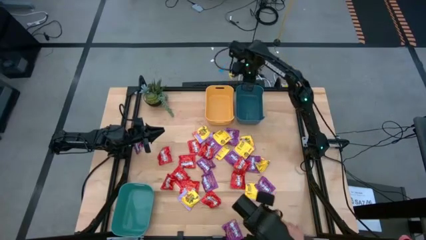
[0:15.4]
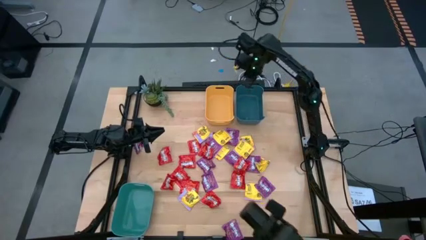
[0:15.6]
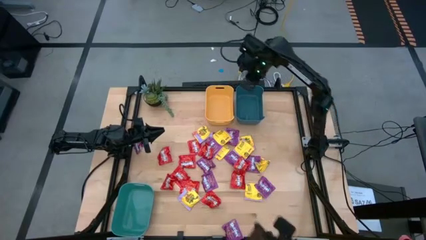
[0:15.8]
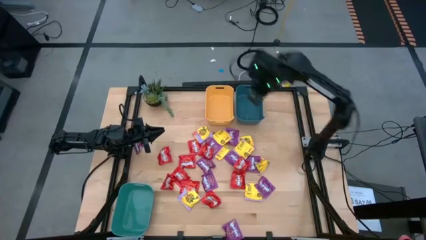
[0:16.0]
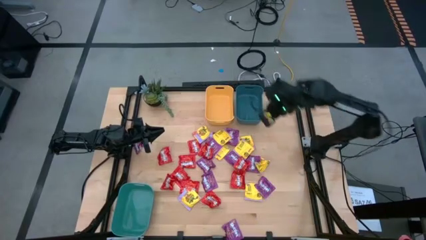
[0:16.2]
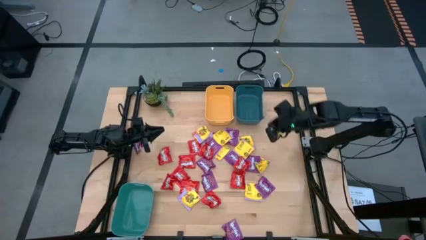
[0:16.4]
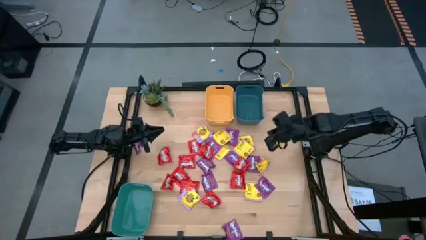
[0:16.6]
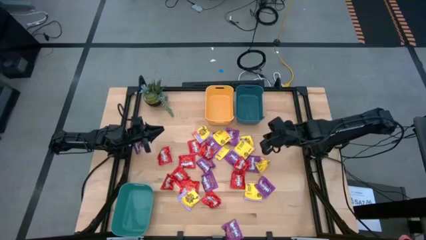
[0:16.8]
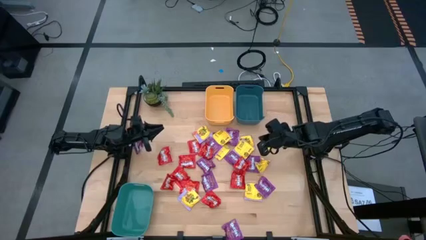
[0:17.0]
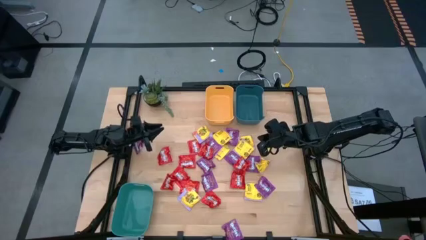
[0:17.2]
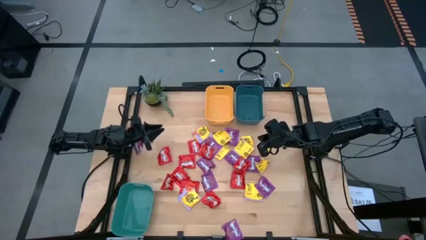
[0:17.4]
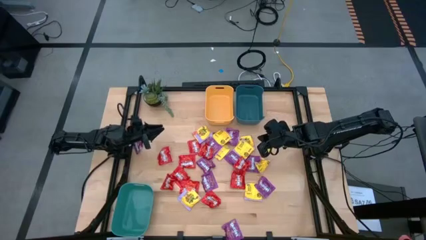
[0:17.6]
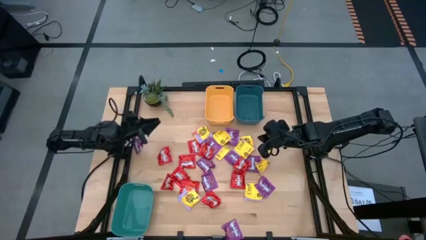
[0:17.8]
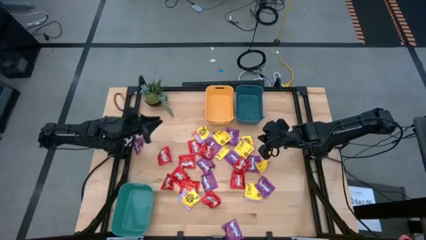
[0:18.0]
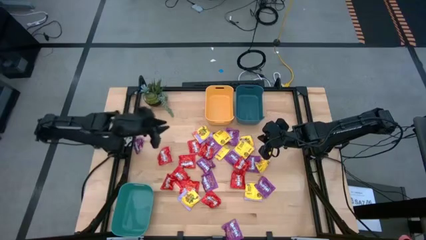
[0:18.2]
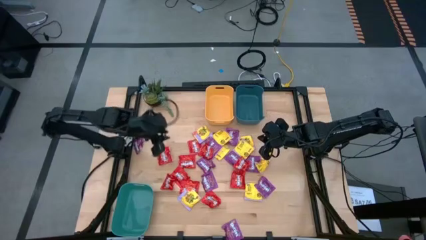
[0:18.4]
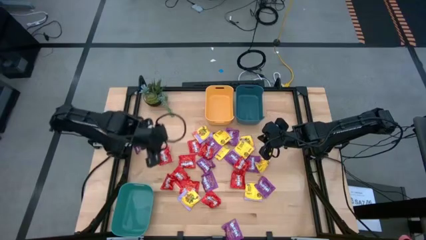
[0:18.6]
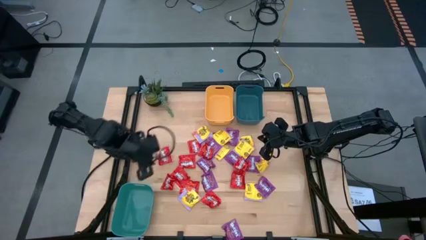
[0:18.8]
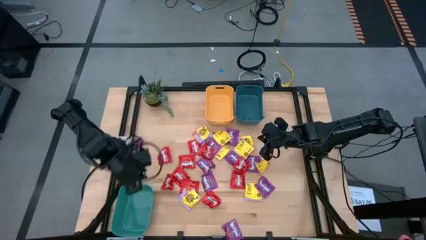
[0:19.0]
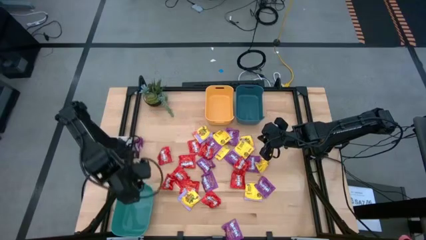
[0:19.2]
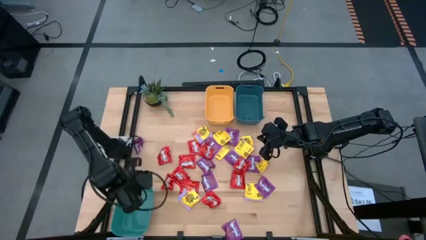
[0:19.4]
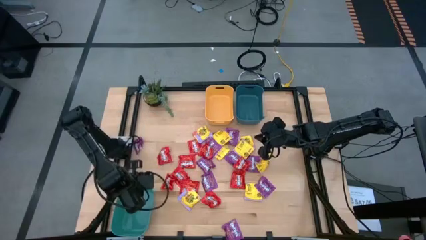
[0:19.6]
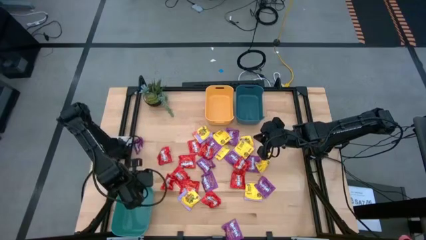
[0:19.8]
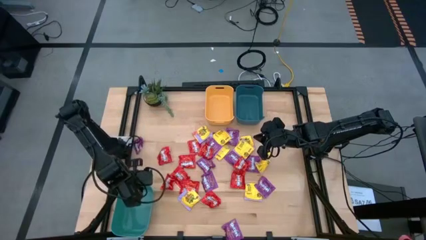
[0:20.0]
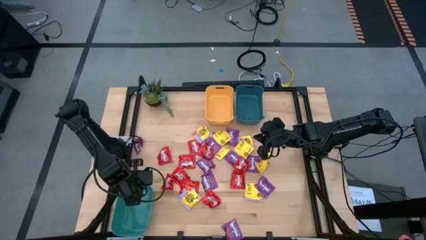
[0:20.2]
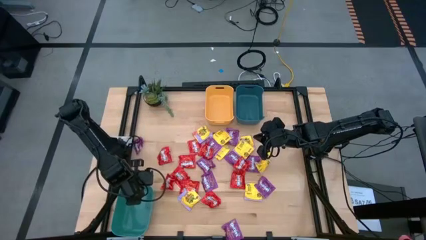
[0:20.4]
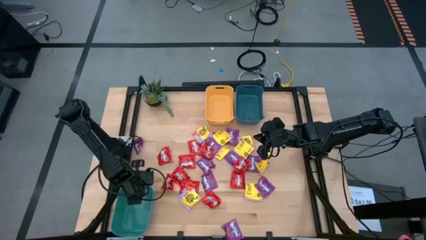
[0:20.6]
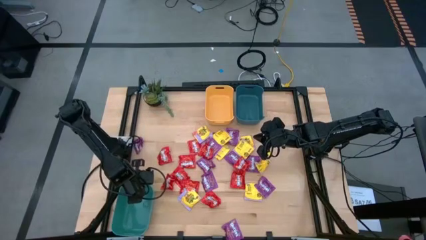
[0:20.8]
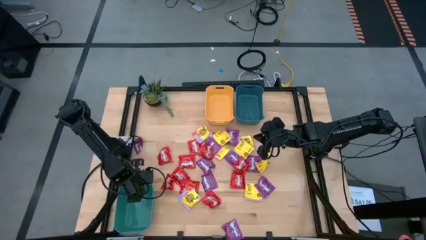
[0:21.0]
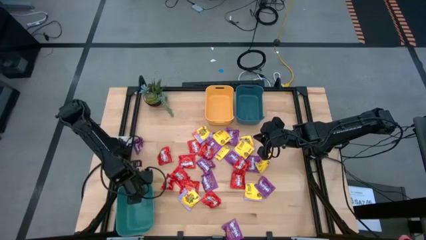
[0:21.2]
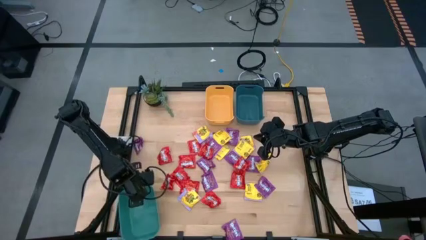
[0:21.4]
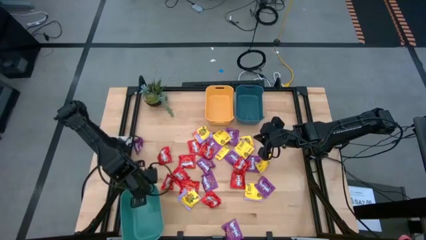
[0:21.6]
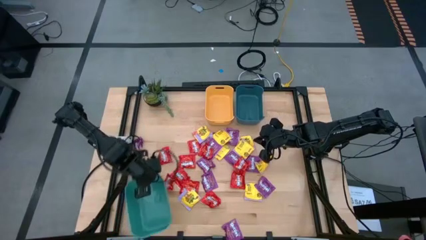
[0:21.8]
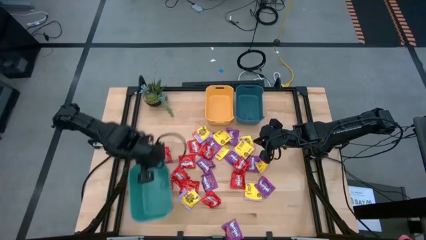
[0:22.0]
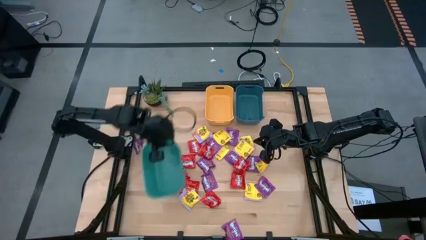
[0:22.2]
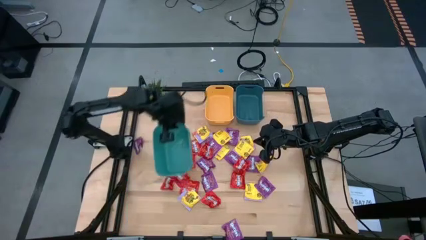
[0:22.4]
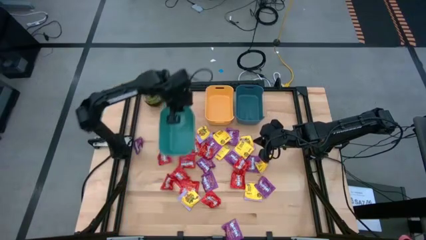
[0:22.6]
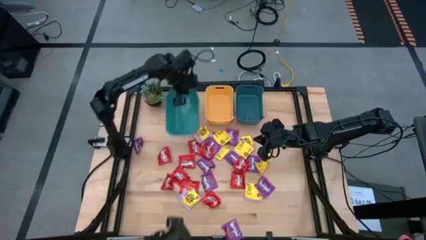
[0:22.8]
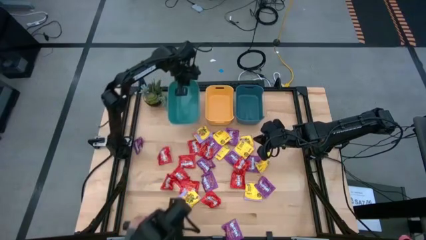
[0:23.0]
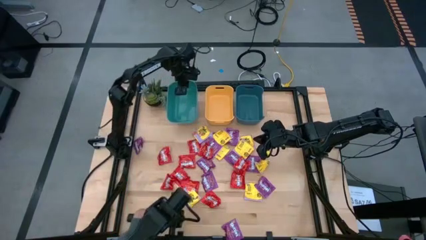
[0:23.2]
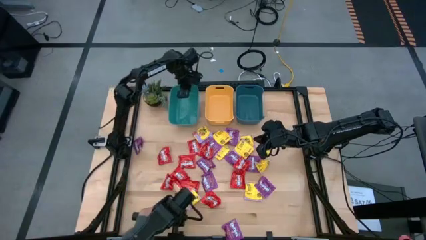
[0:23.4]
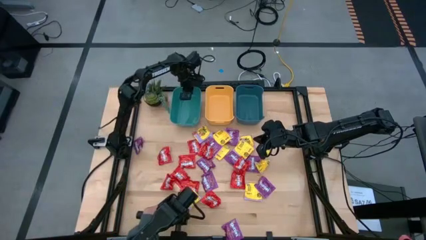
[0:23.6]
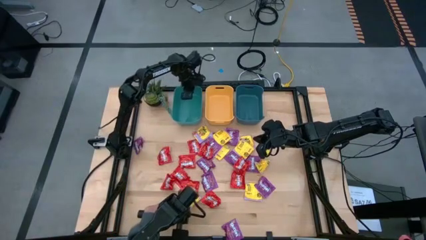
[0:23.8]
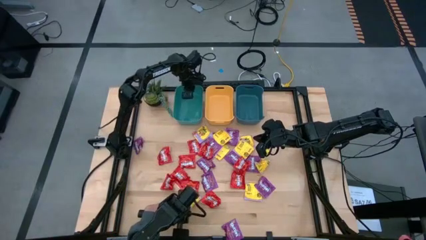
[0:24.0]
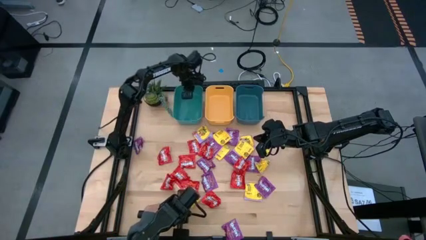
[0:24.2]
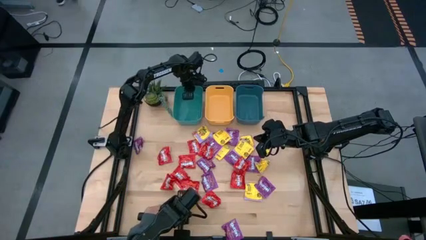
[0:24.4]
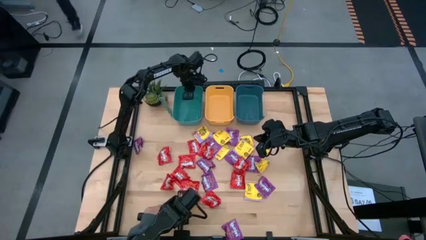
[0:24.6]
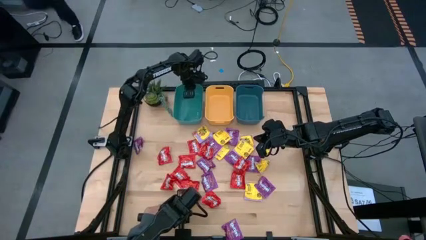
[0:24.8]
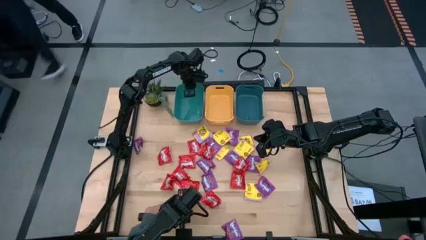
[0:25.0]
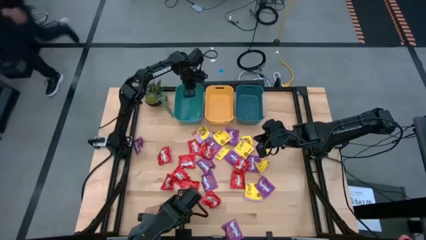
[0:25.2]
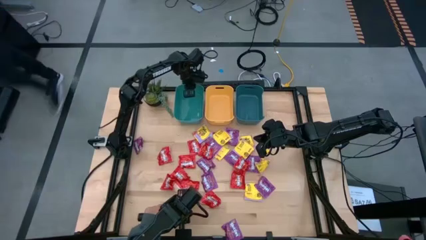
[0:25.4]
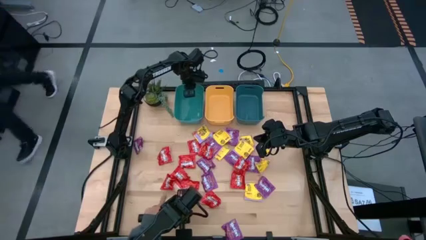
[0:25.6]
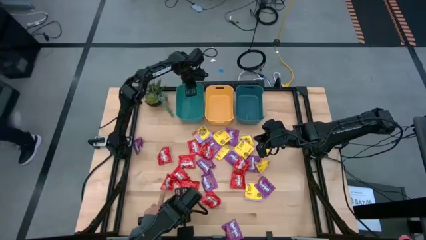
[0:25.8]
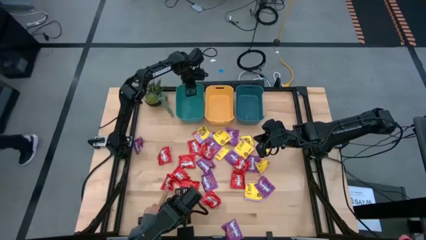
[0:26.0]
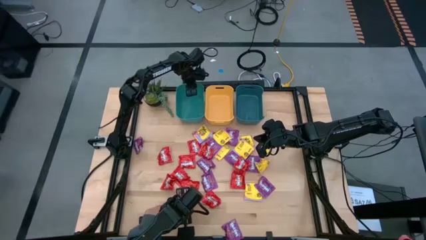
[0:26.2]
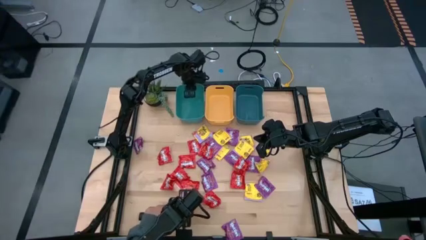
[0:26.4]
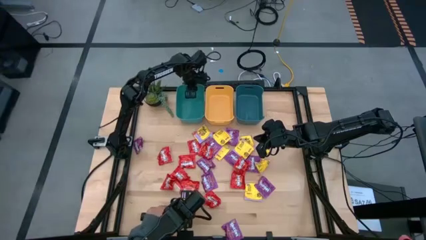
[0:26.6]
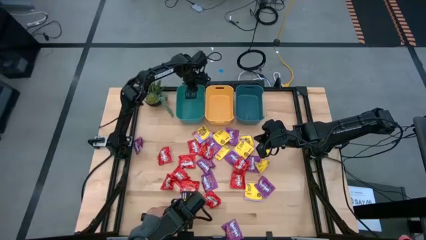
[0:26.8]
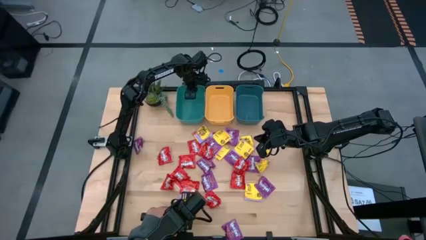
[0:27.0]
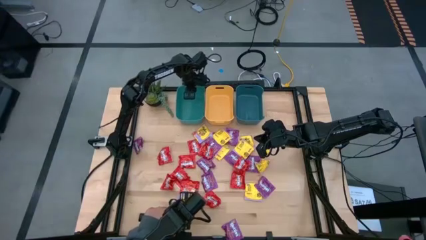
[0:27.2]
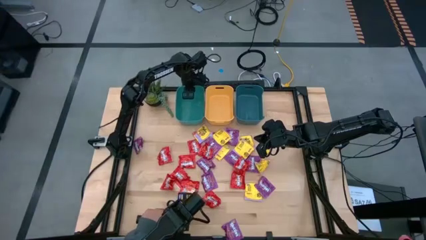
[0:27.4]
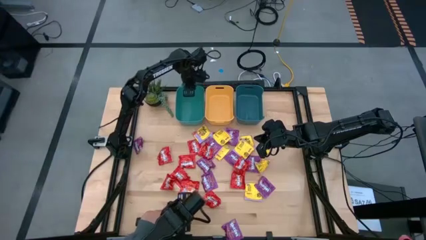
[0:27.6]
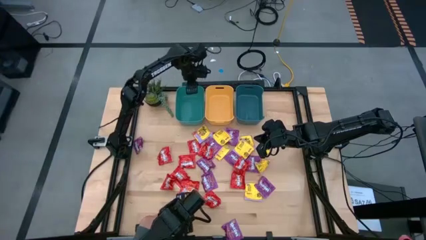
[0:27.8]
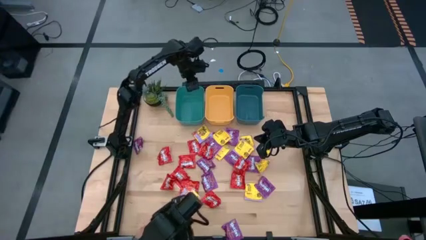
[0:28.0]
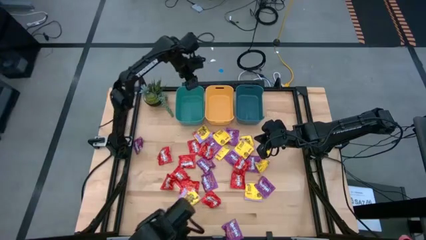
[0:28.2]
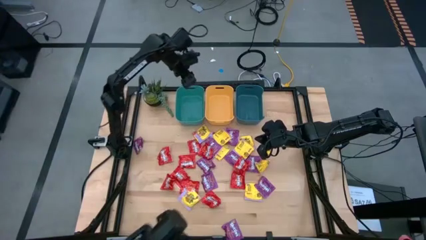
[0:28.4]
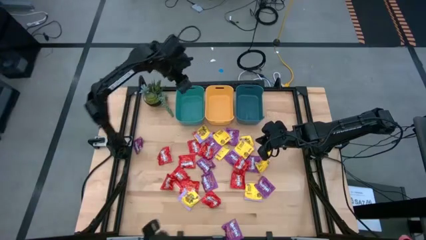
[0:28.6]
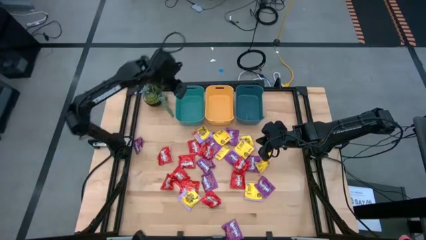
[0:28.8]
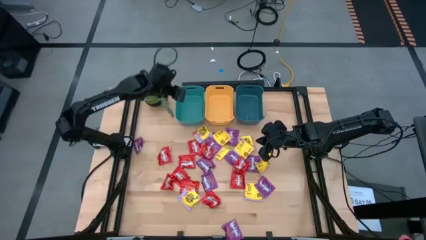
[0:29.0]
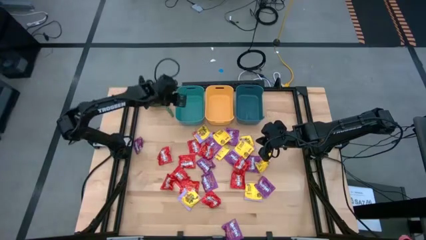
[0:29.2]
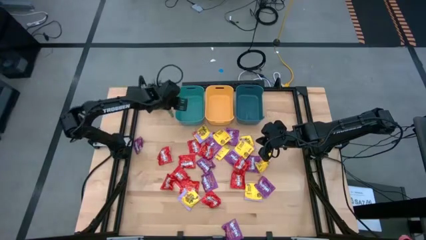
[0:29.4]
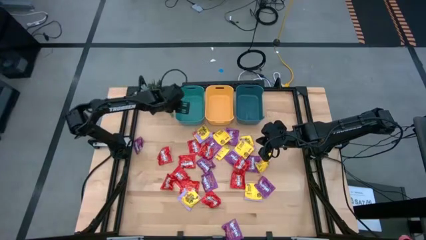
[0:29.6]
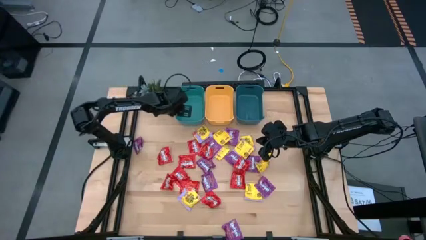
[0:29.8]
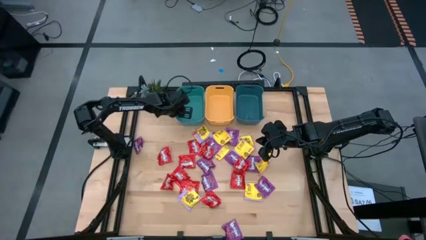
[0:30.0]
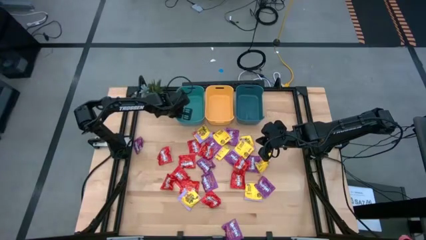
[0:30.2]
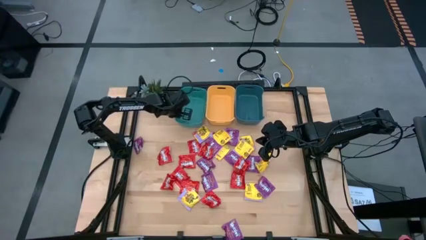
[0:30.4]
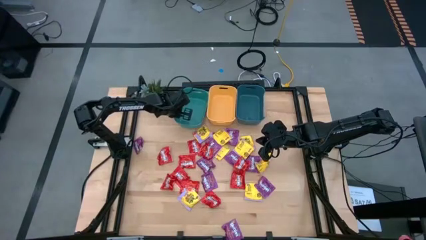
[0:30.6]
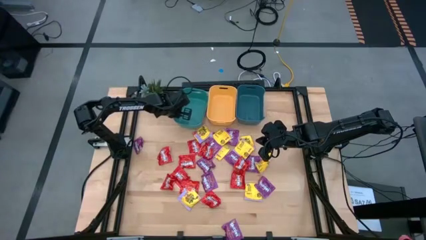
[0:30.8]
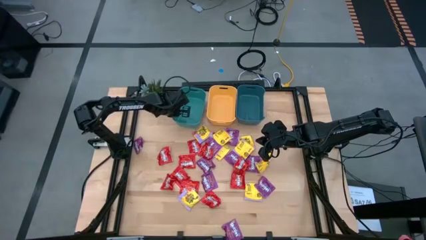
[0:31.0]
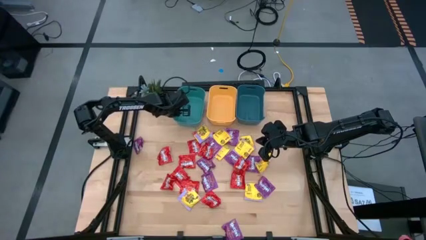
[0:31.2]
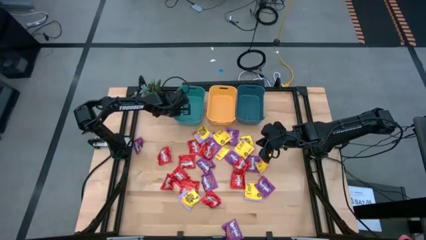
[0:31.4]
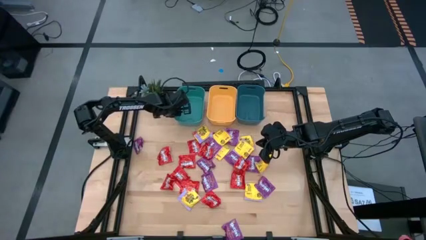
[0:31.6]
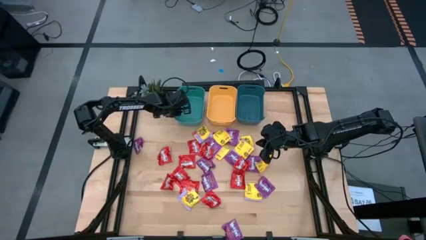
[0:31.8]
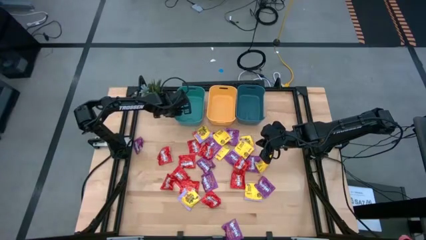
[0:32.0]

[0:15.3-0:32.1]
Task: Sort candy
Move the blue bin to the left side of the yellow bin
